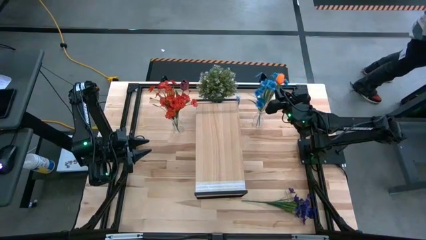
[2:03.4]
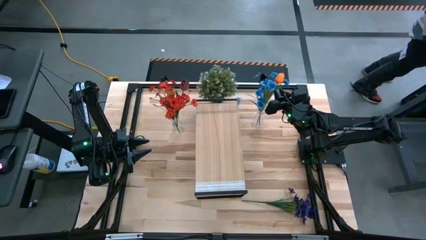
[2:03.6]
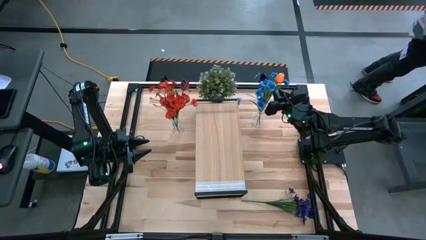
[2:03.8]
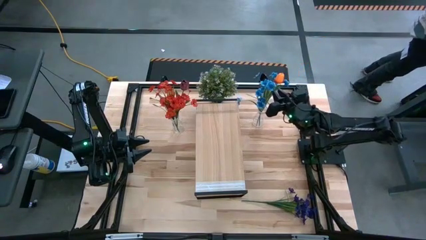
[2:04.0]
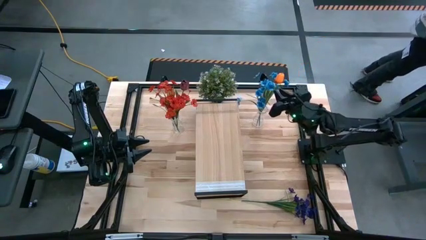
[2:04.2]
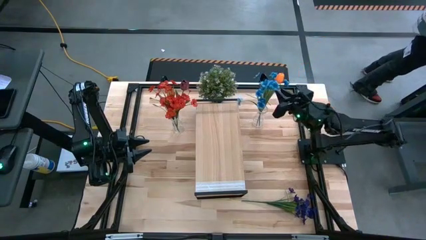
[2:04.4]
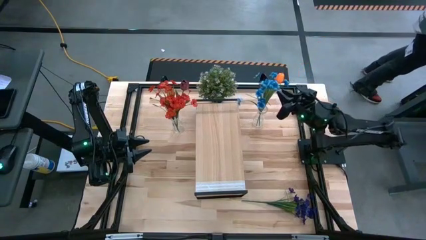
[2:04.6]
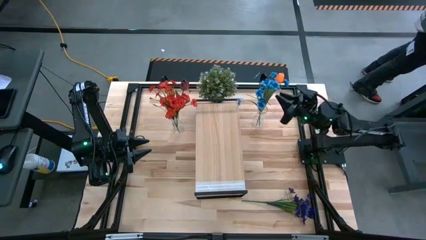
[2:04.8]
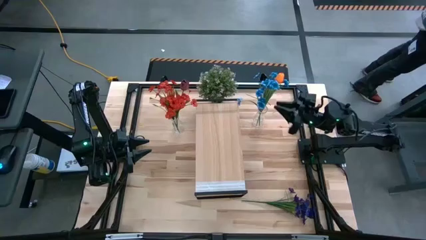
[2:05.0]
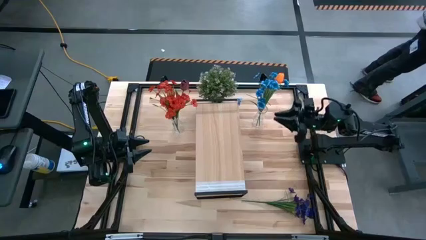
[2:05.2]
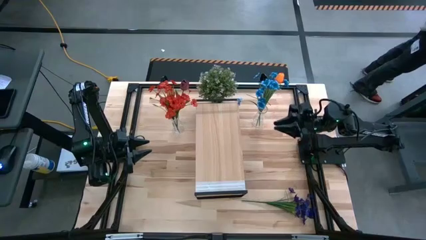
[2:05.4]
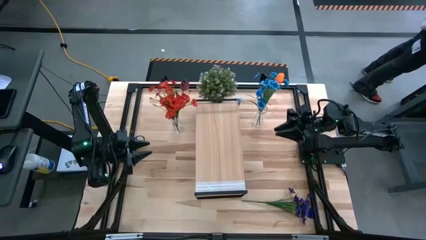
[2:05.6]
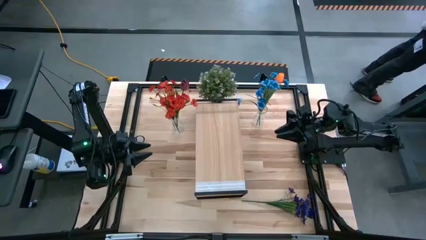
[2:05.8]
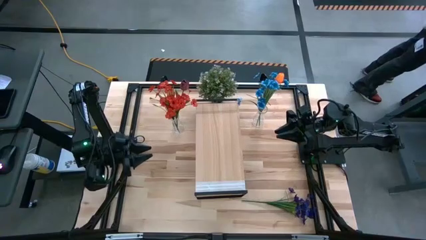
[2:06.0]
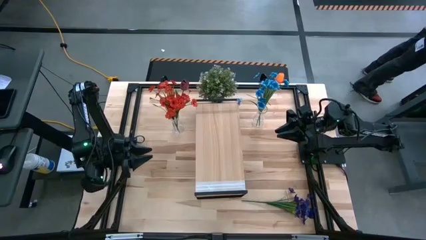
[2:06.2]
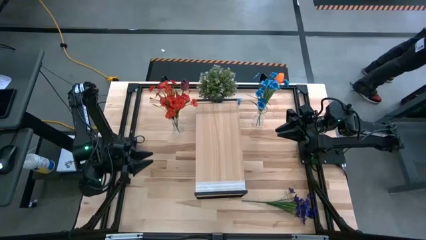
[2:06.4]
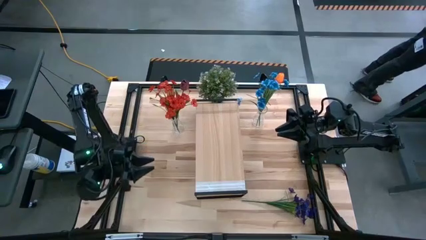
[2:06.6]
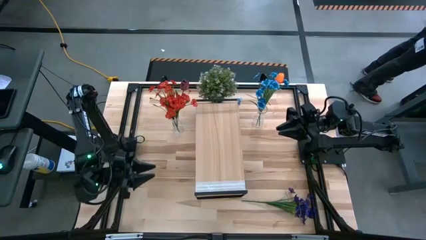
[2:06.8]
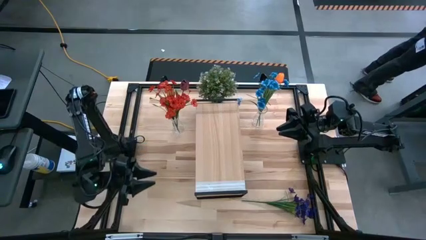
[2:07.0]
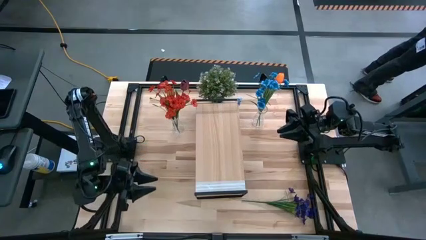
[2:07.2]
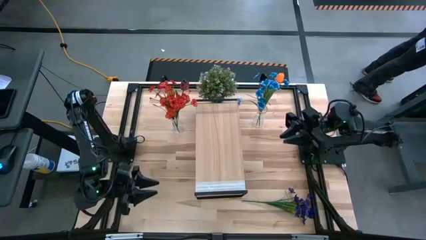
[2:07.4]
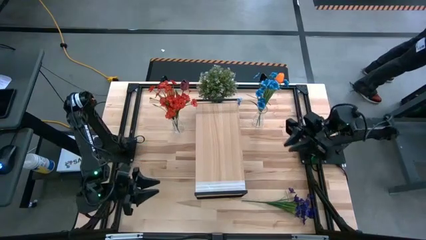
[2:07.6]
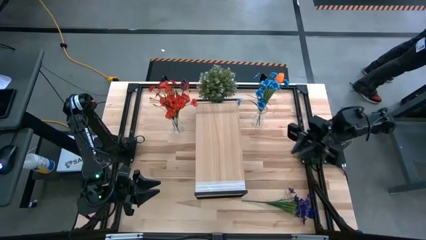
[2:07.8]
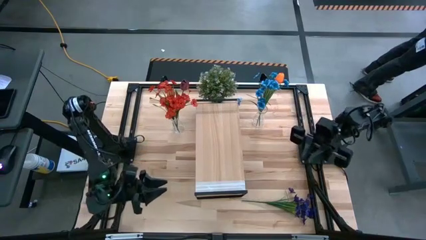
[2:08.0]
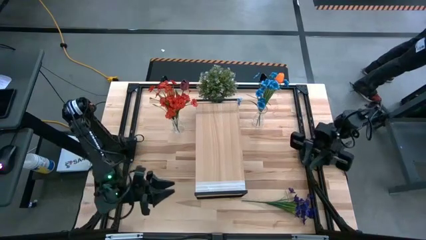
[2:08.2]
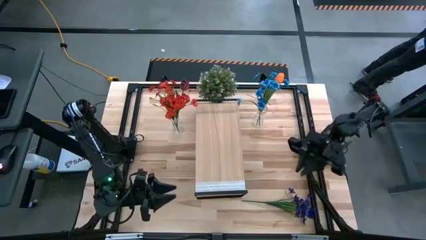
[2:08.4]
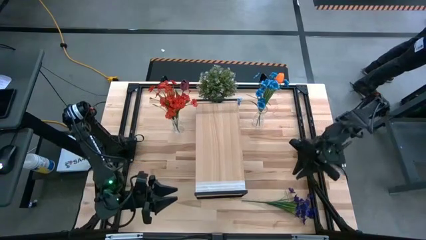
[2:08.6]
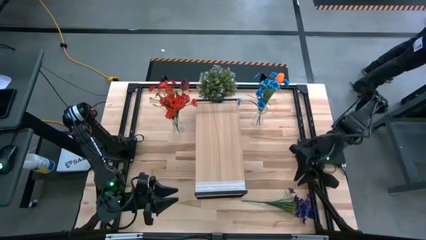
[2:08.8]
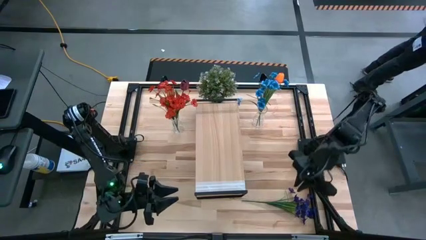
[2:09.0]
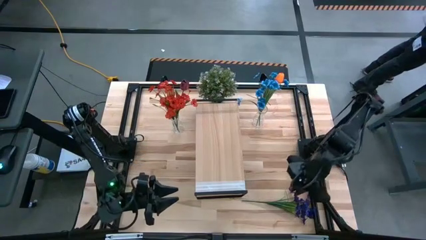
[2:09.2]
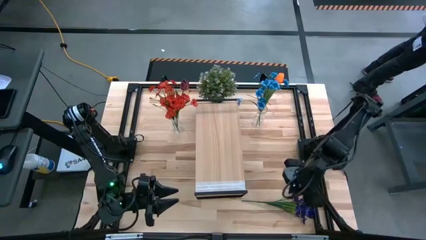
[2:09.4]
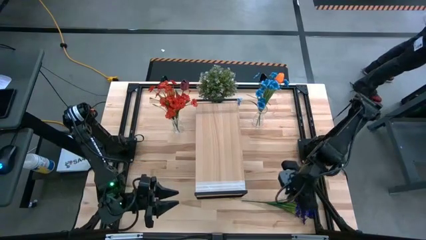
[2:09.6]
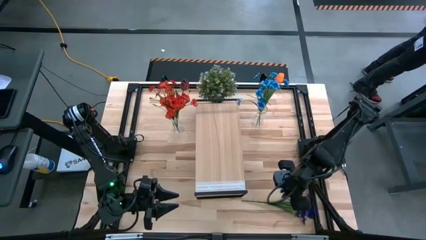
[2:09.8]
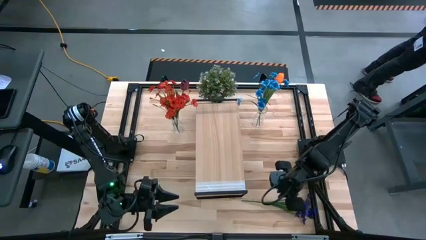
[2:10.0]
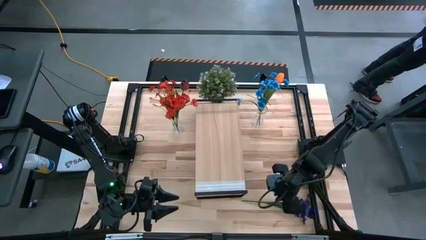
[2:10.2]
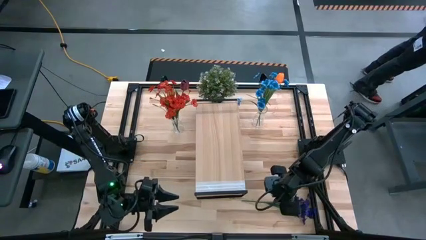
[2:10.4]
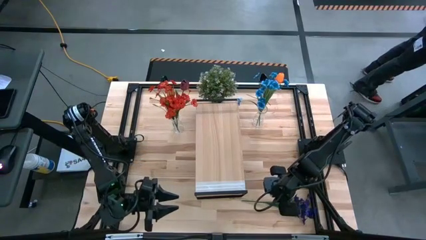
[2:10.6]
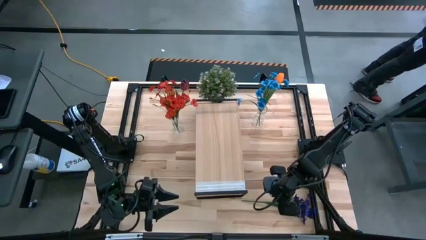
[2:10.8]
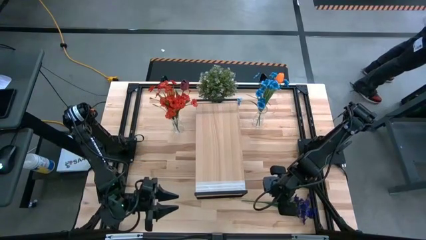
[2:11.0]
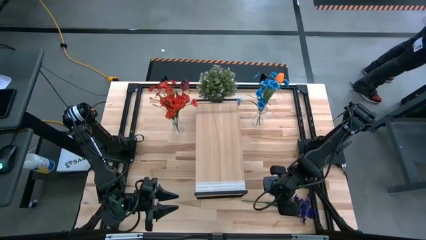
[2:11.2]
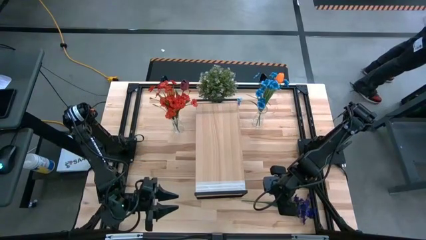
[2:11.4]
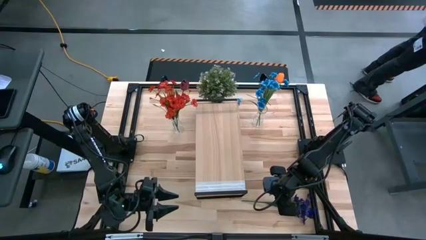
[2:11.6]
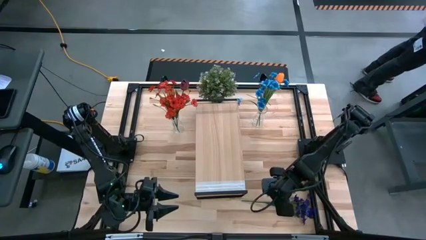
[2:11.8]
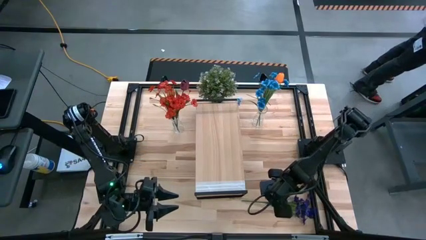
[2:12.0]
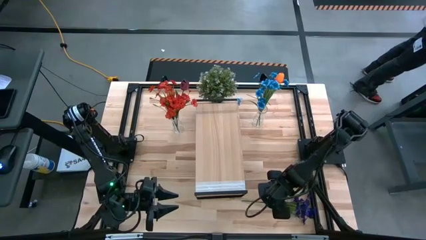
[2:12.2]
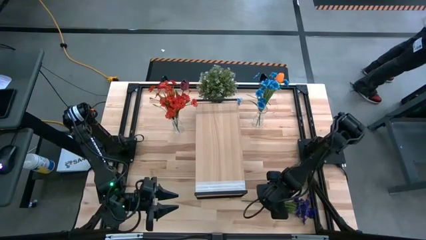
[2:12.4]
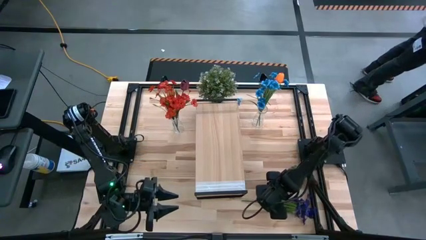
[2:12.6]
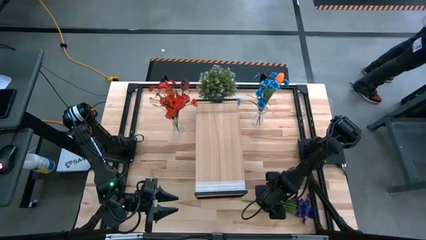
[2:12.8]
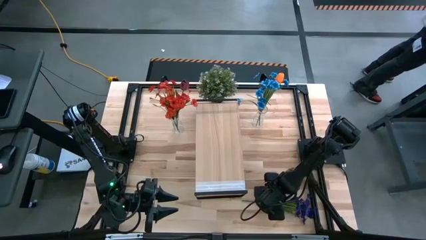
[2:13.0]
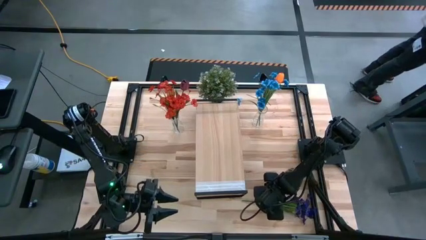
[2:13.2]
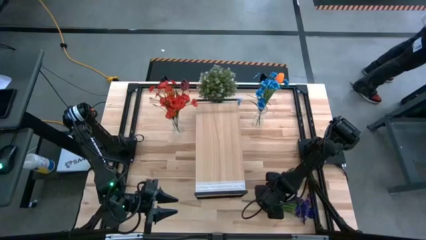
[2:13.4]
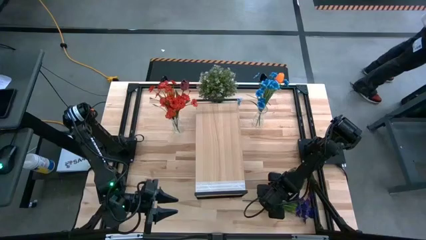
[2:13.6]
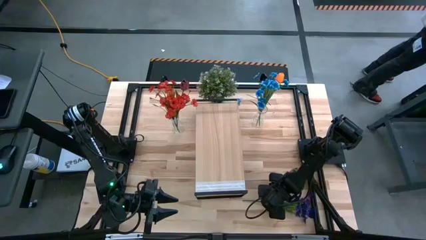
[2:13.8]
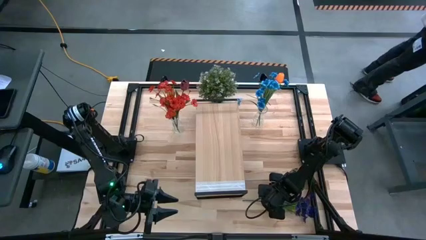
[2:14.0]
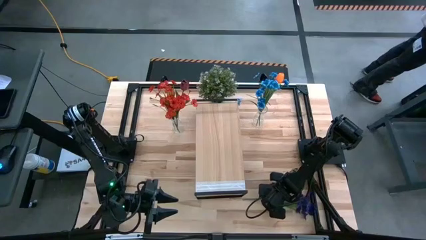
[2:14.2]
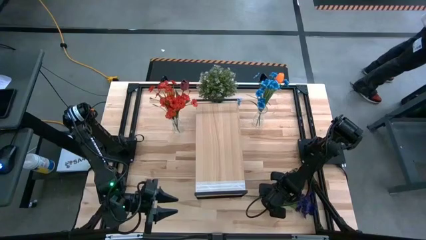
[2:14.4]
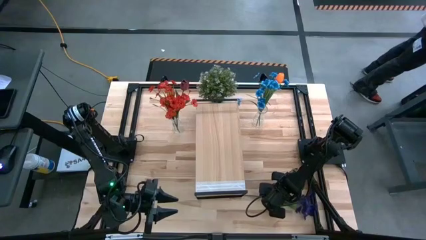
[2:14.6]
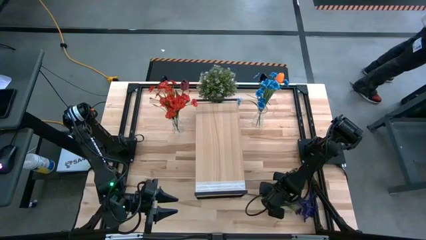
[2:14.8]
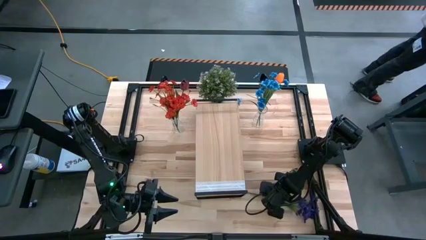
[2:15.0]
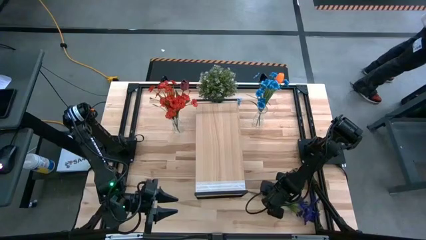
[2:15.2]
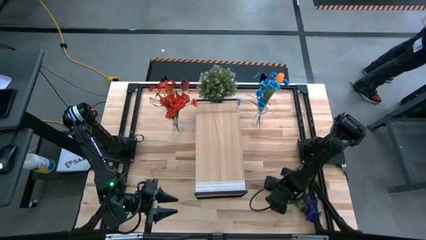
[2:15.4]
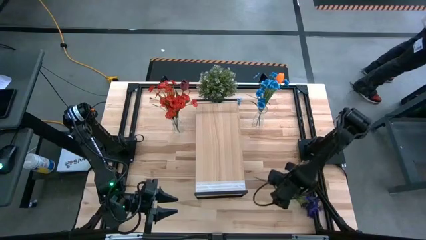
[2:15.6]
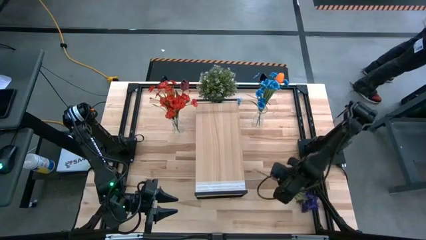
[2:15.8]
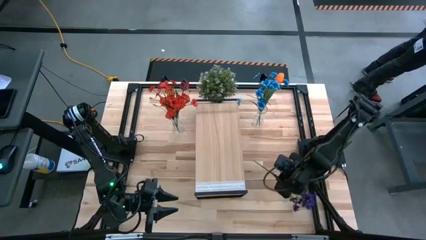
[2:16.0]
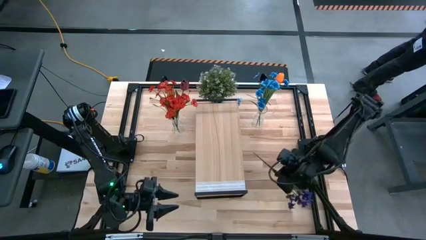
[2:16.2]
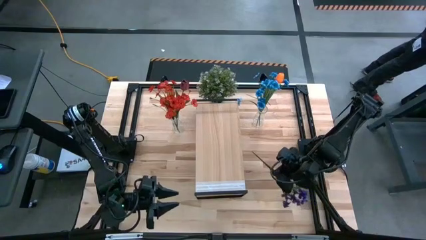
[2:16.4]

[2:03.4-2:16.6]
Task: Pick and place flowers into a vace then onto a shelf
Put the violet flowers into the right transparent vase
